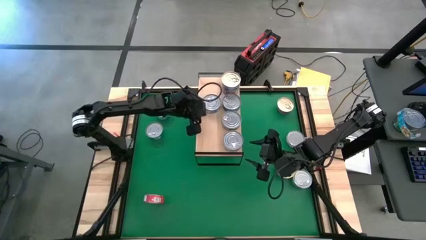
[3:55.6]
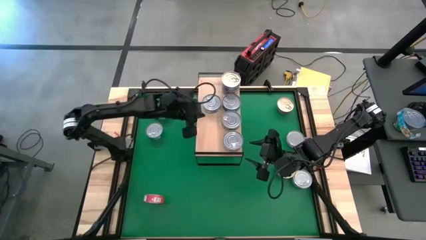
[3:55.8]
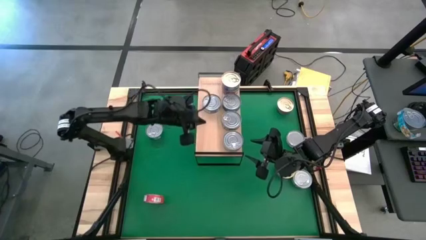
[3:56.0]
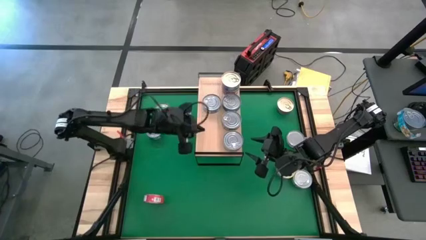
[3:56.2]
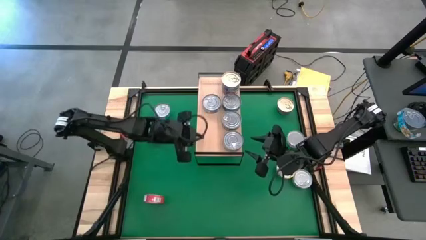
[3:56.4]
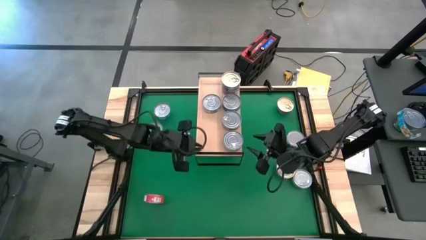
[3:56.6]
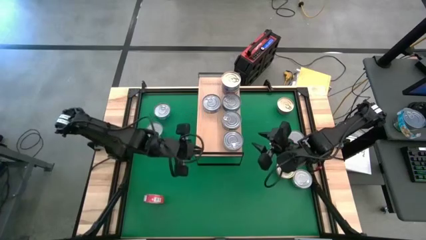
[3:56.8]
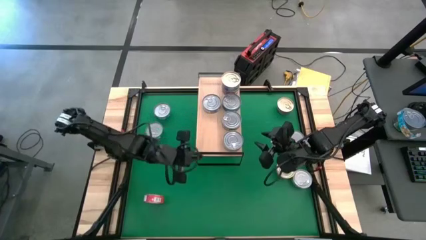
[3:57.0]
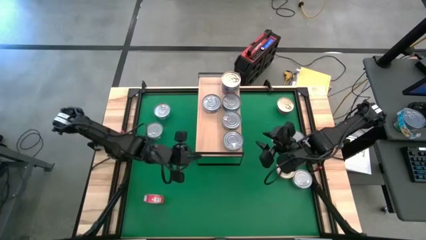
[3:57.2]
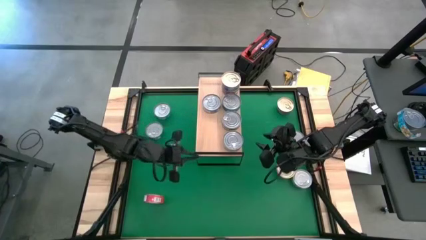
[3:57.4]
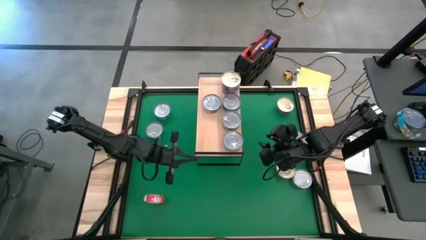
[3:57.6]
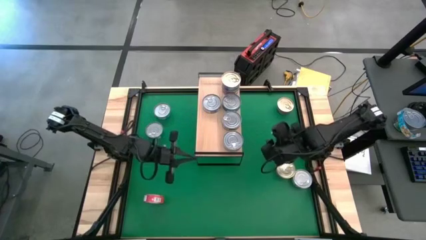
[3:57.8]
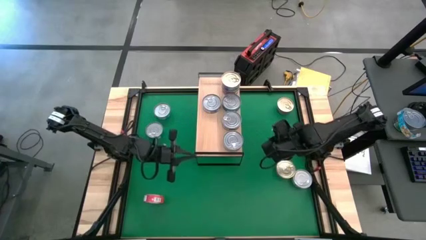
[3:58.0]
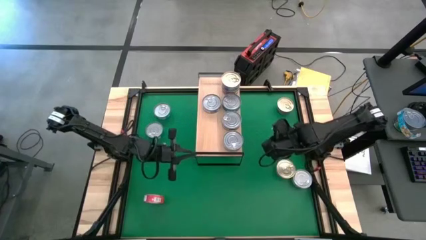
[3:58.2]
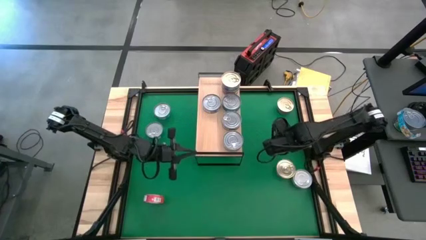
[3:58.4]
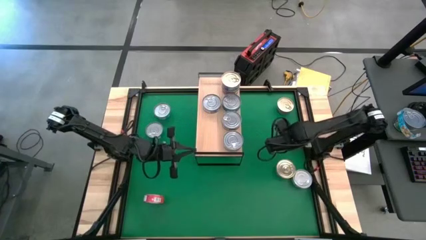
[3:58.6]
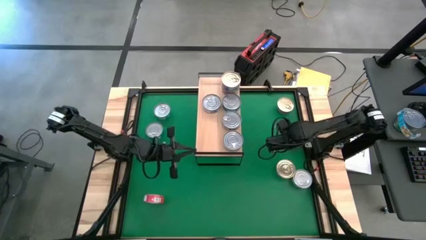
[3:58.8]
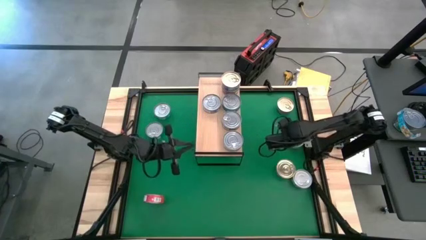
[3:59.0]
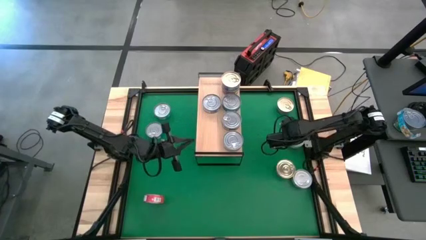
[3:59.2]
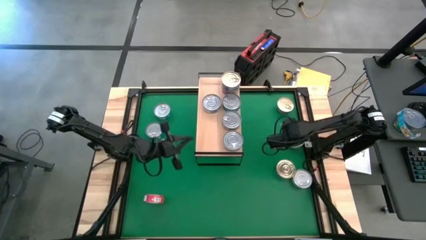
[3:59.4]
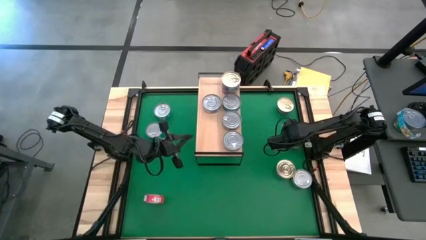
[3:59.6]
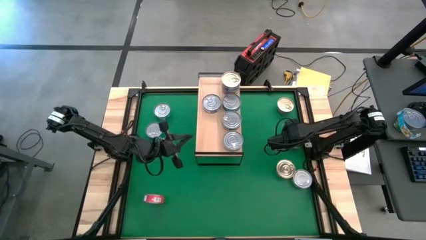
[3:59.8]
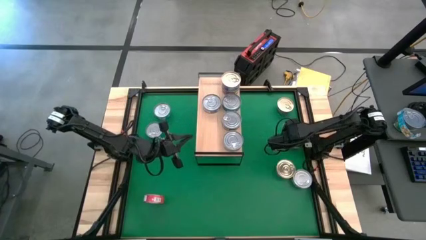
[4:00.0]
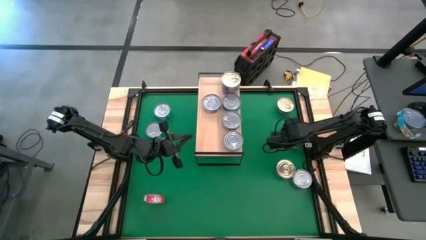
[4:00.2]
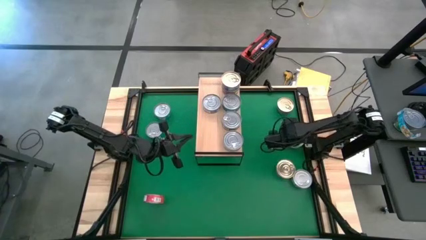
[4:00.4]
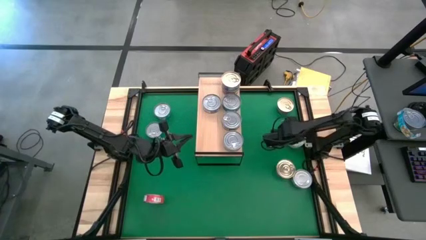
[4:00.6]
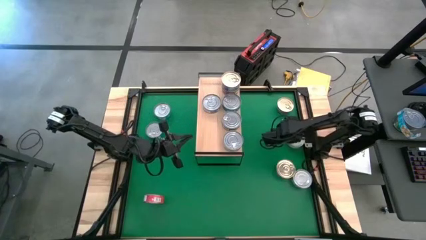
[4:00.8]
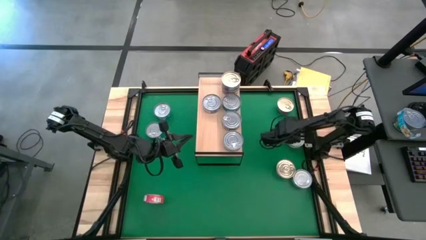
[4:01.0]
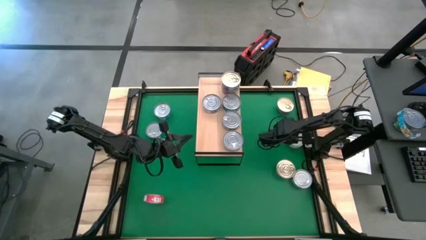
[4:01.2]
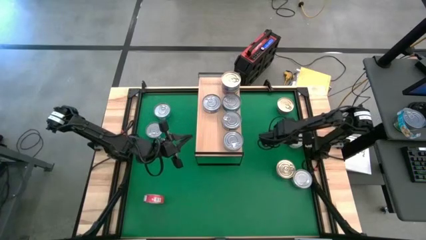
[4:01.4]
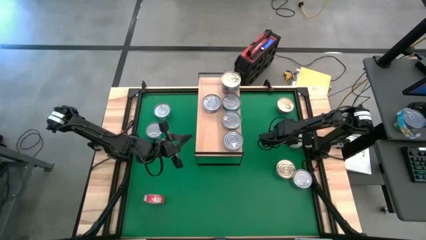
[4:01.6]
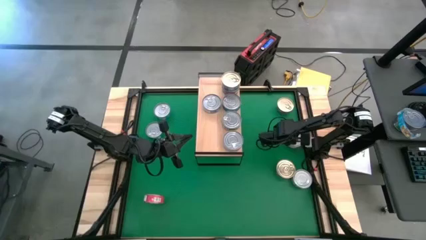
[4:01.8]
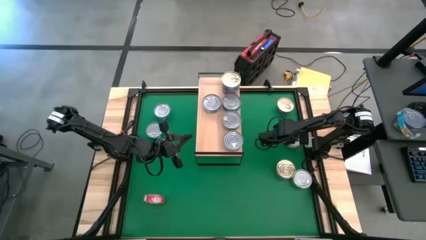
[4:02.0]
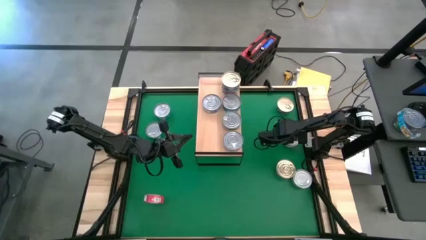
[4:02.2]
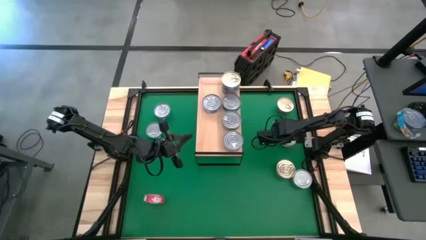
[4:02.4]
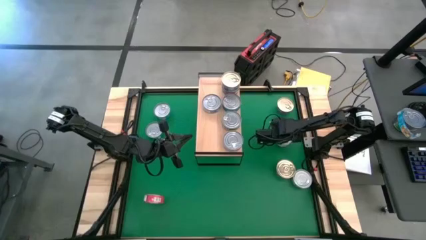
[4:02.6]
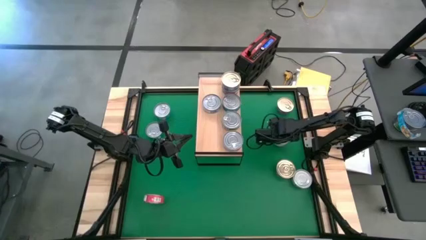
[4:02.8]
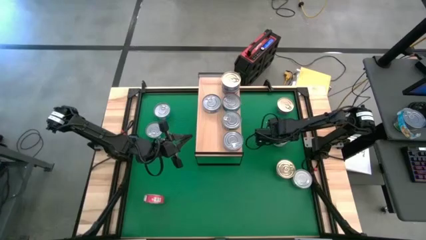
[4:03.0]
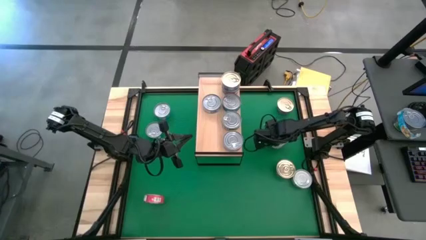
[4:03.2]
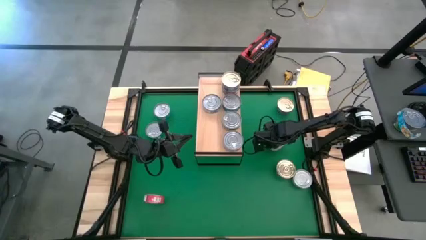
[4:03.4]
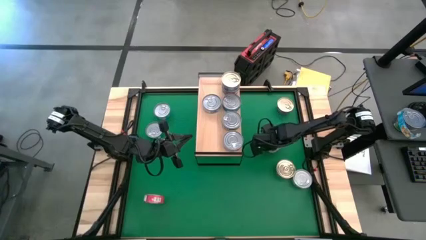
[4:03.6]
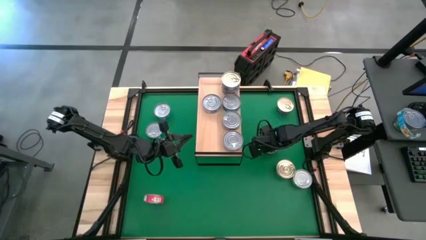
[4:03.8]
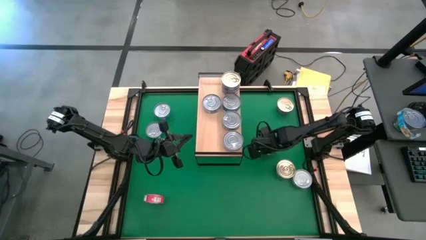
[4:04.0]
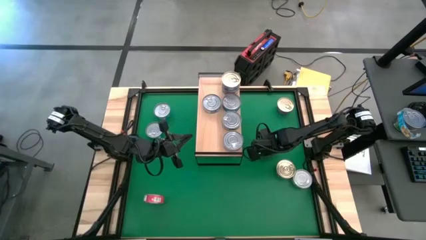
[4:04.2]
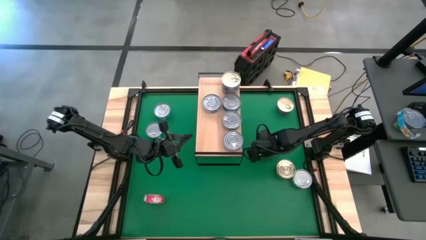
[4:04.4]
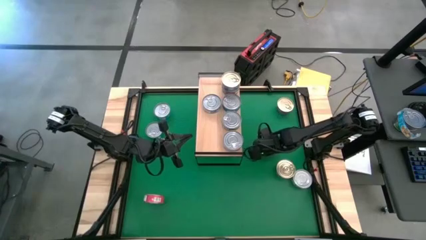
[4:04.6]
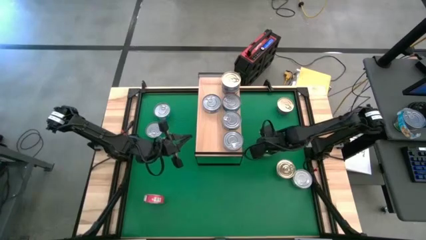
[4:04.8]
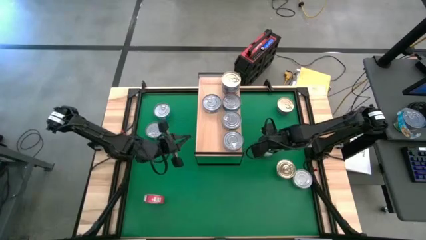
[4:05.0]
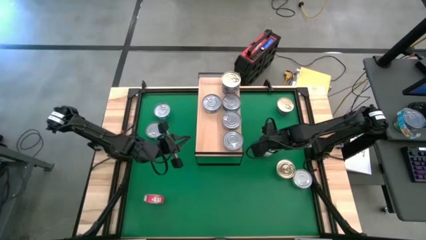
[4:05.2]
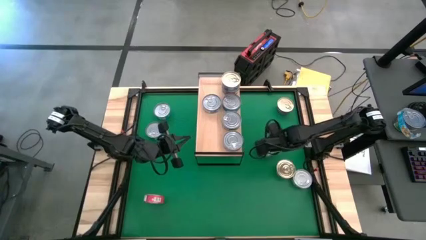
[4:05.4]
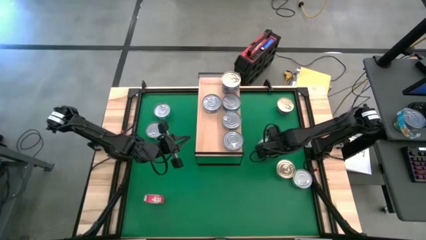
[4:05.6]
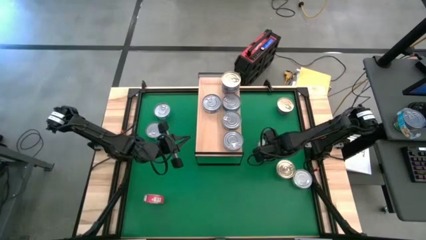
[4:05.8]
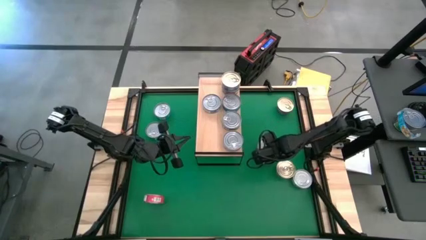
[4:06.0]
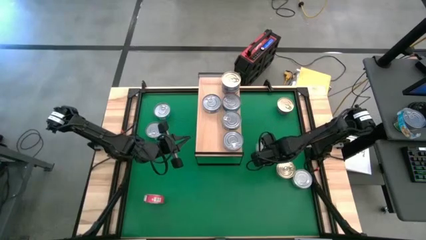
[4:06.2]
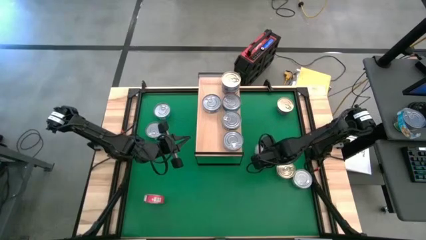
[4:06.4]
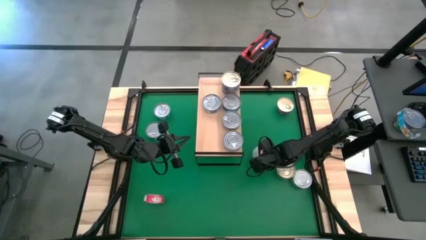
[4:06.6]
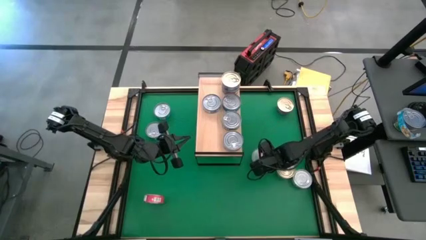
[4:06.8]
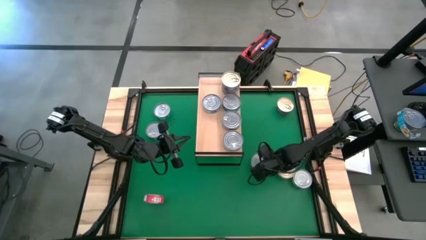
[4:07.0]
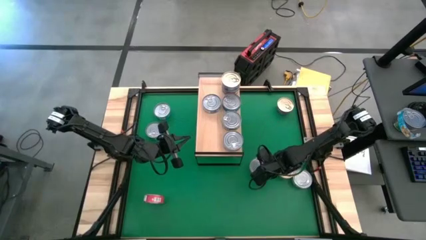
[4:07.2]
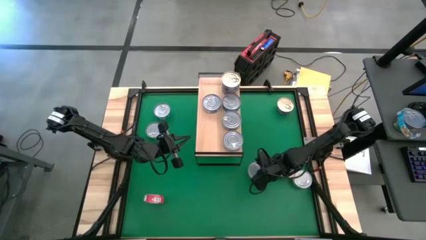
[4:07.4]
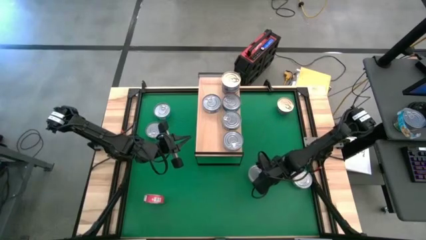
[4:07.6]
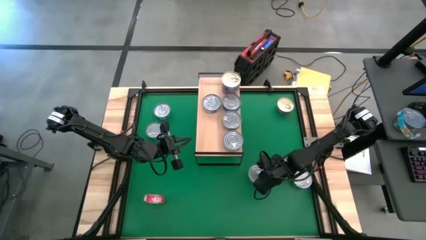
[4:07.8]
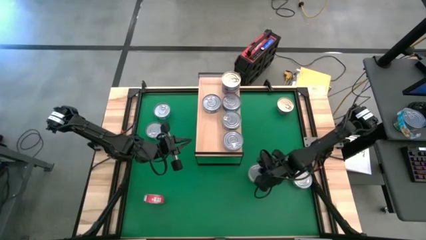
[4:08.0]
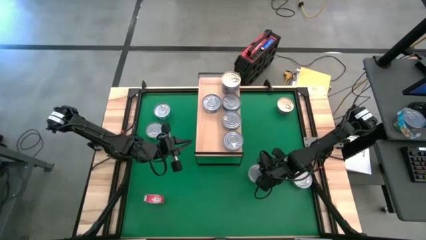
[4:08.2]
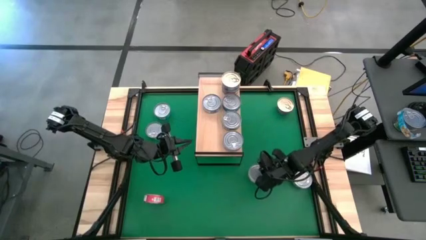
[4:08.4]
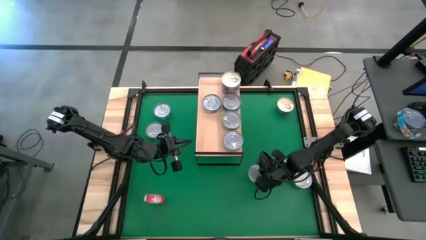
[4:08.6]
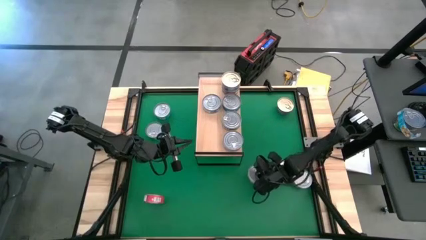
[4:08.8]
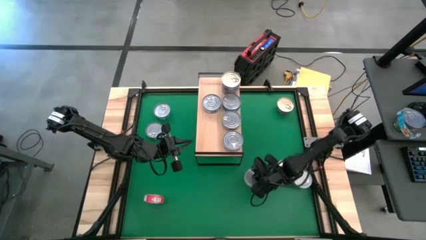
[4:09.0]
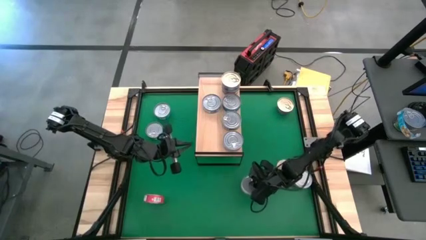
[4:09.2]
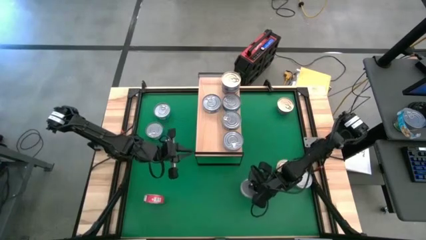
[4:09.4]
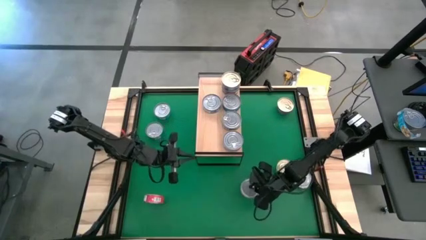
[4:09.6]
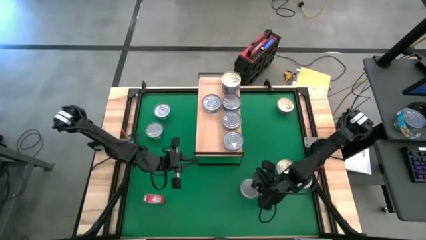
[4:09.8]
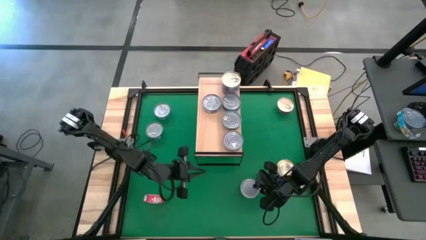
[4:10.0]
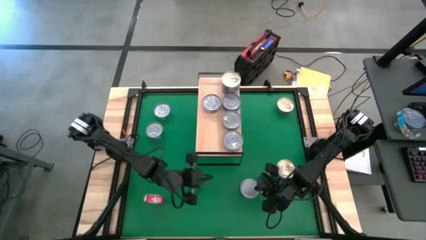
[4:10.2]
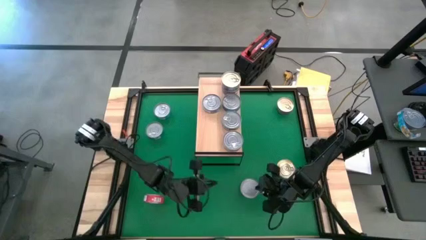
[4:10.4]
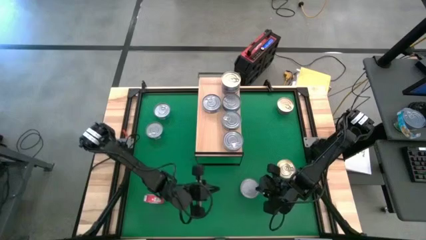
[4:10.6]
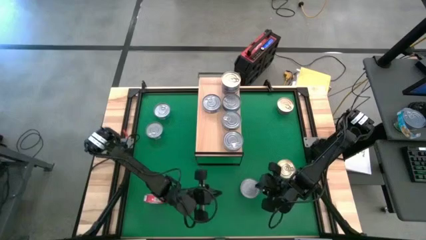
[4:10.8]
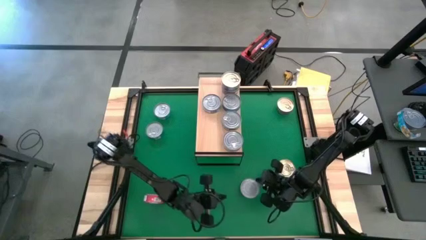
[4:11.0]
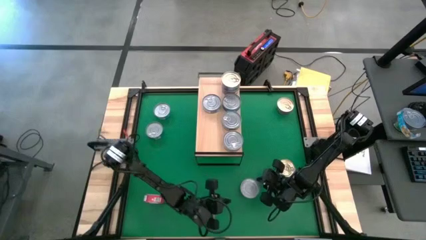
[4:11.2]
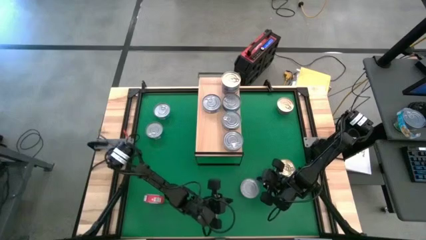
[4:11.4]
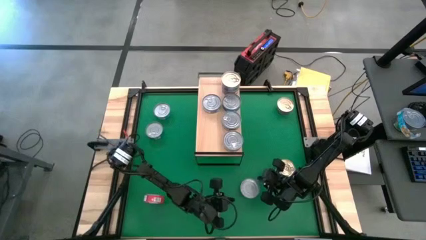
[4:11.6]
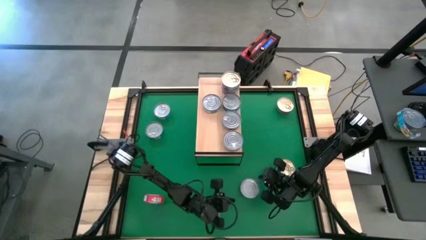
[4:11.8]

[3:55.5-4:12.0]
Task: Stack canned seafood by type on shelf
Stack the top green tuna can on top of the green tuna can on the shelf
